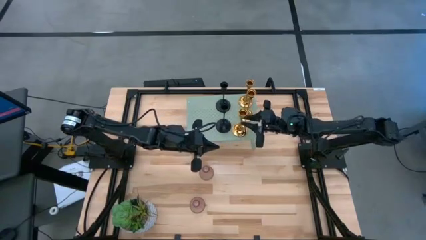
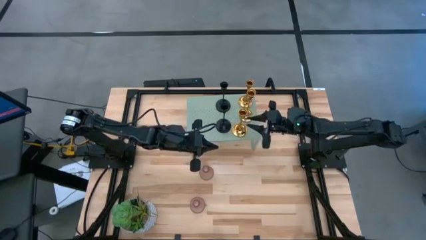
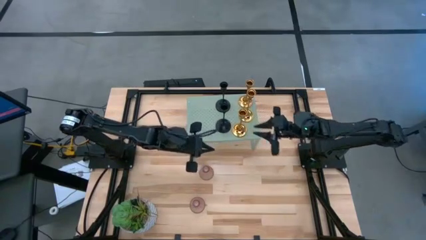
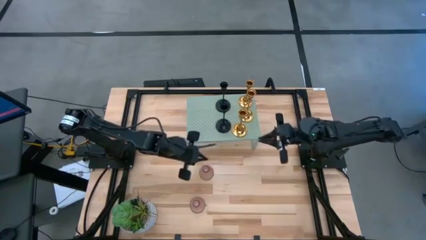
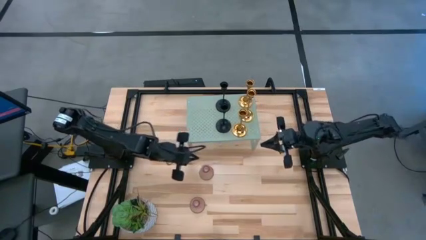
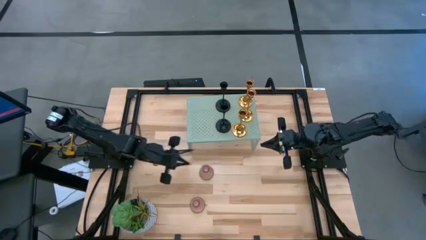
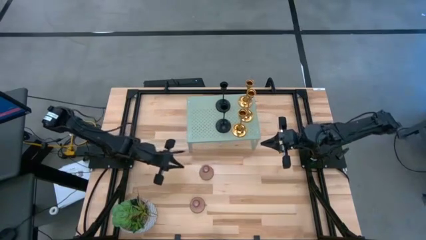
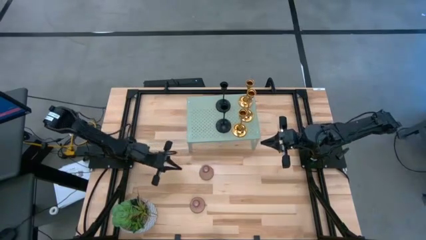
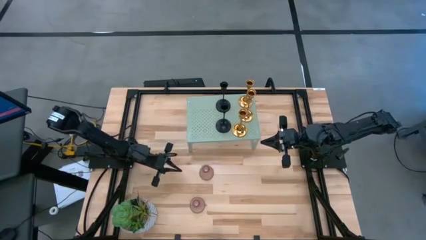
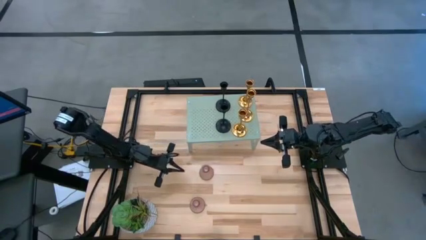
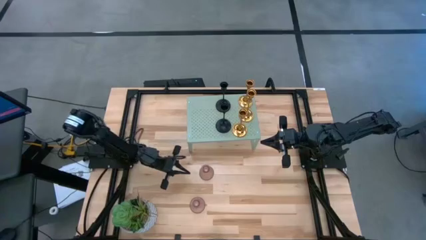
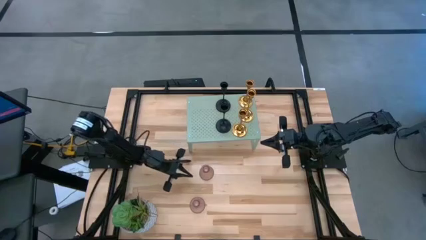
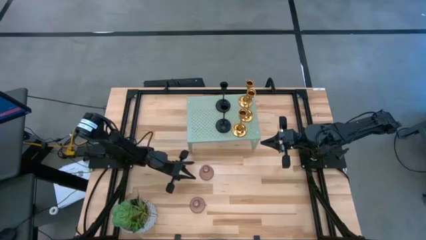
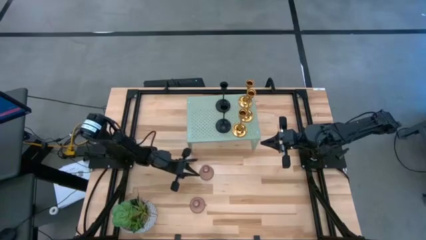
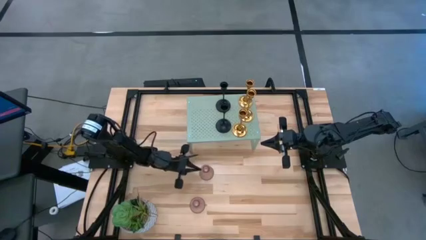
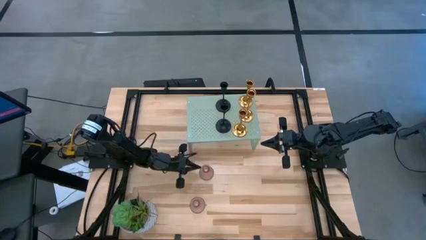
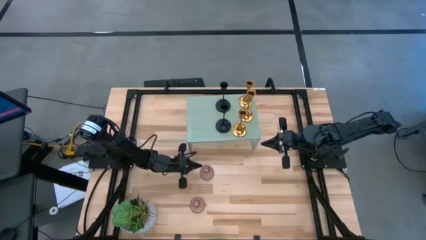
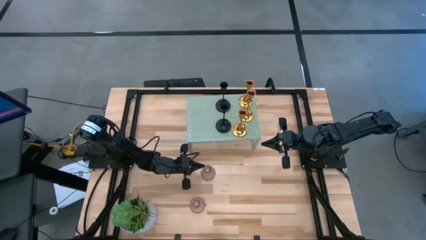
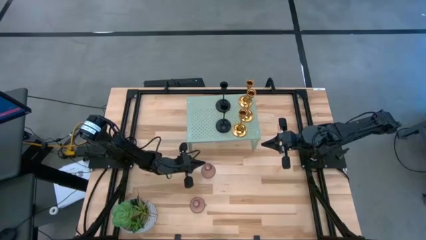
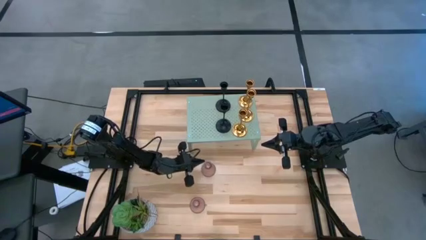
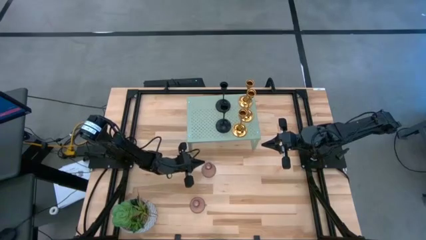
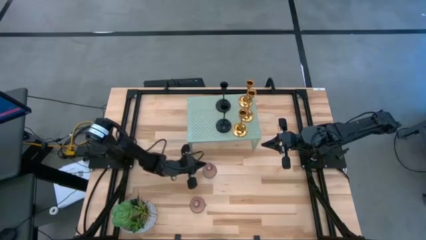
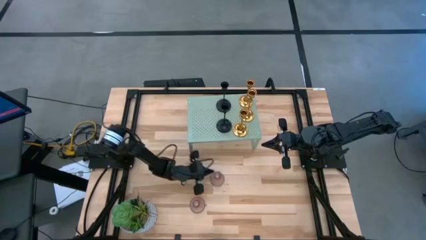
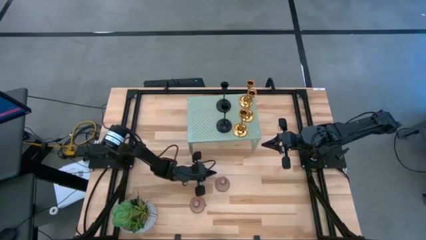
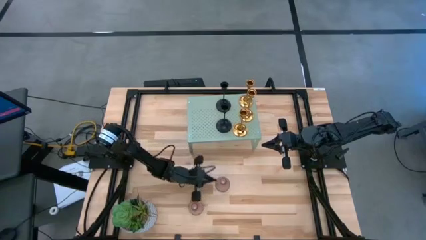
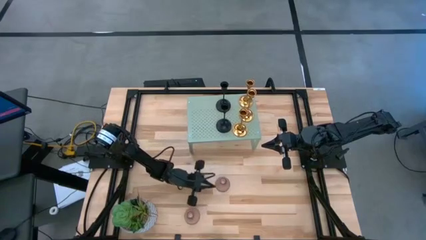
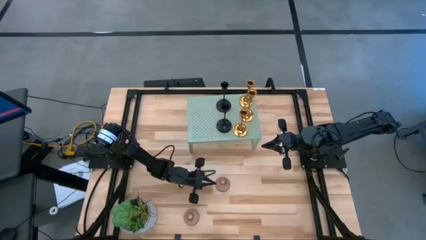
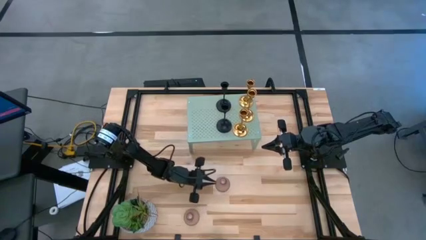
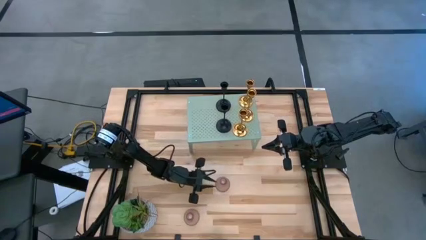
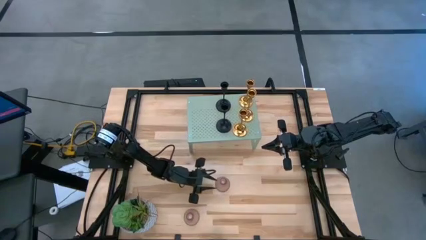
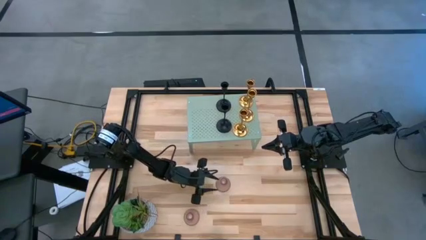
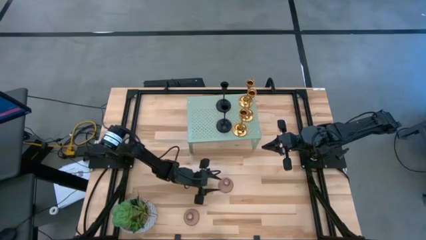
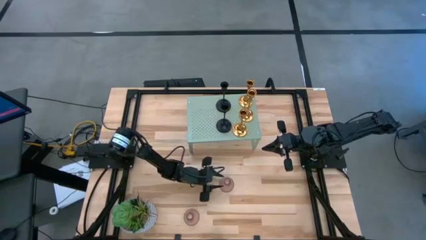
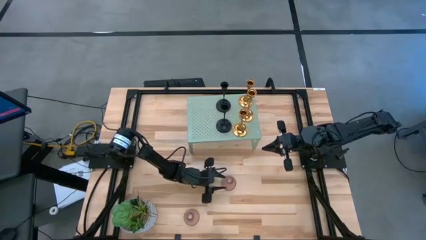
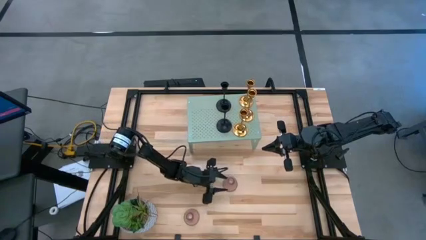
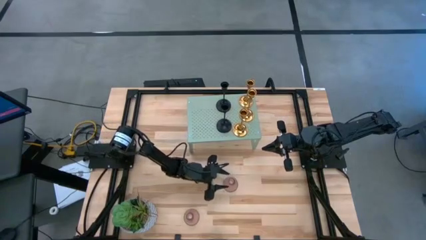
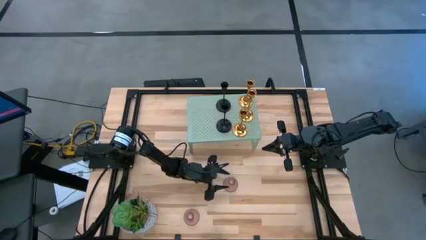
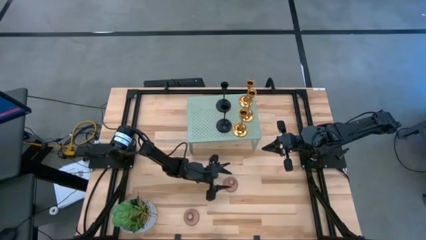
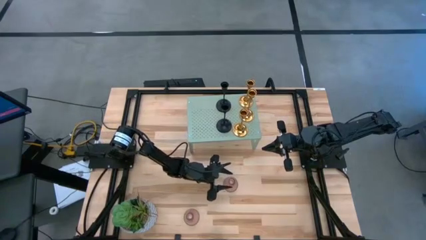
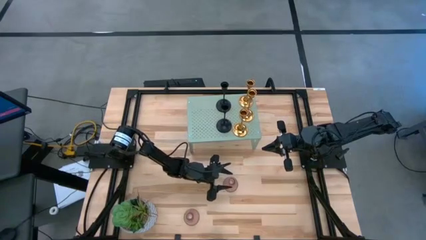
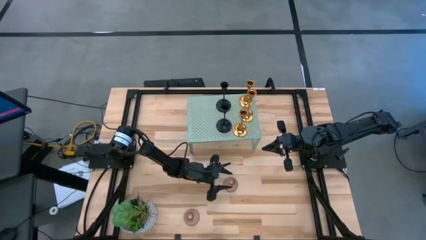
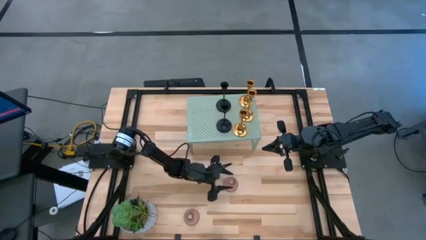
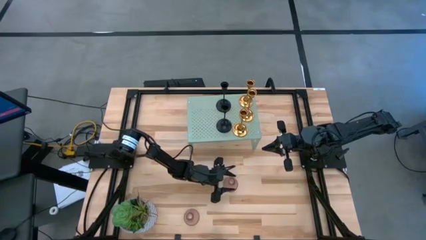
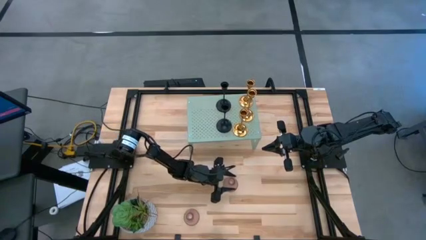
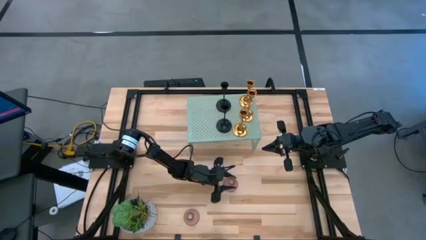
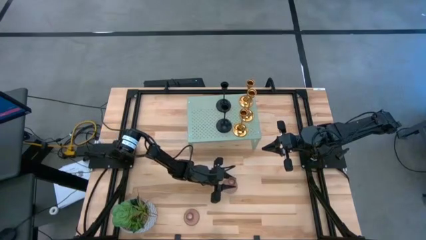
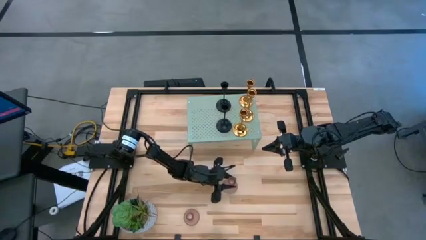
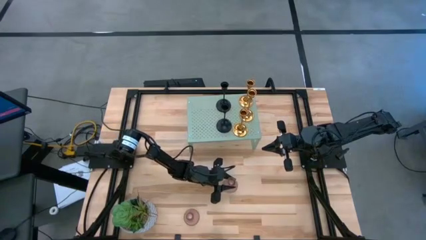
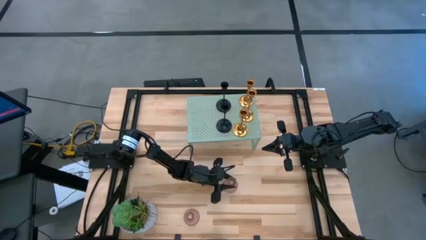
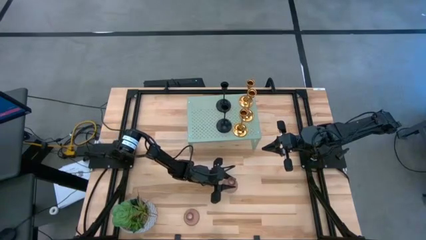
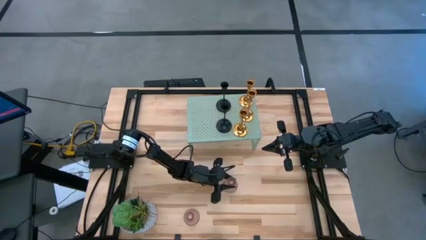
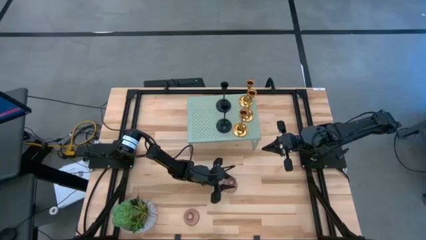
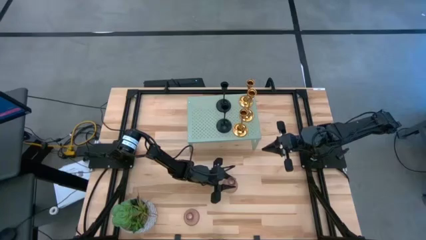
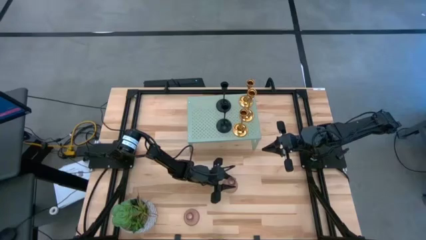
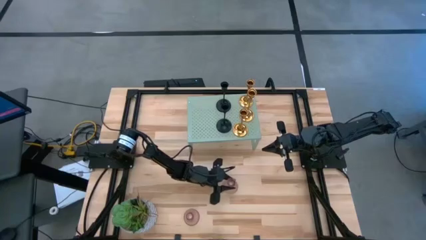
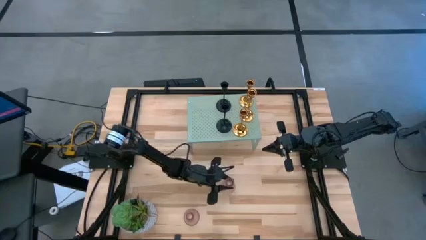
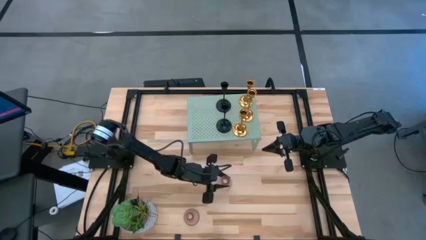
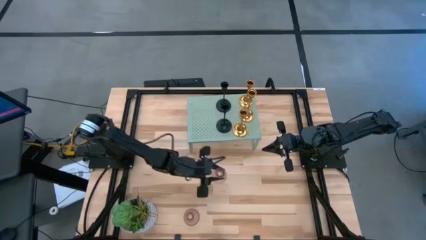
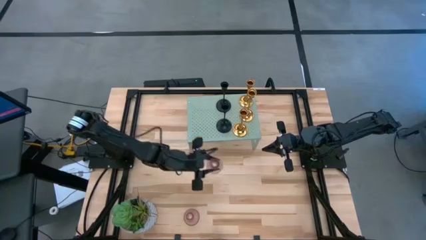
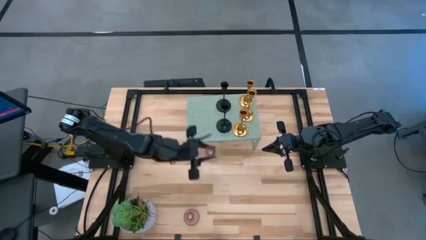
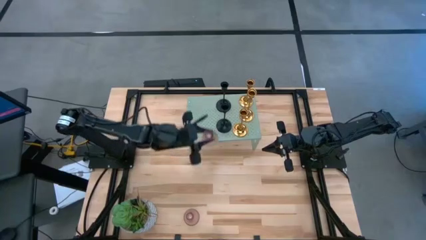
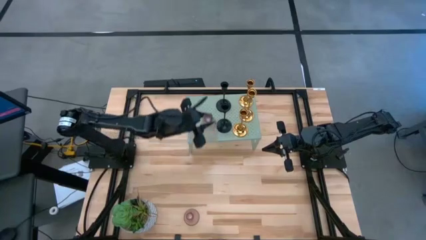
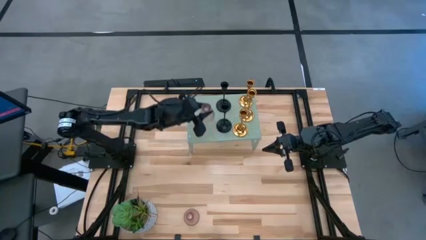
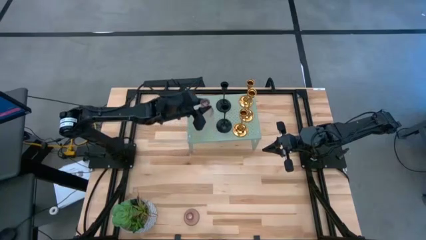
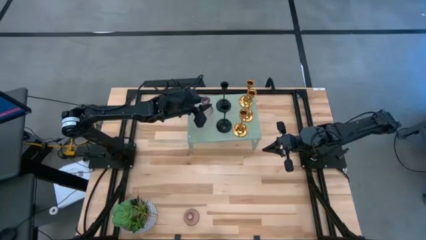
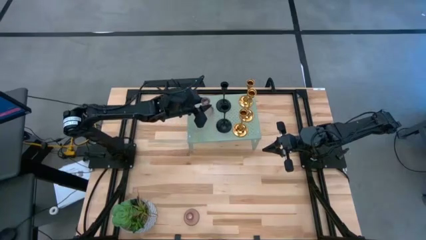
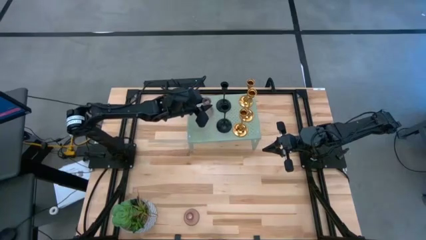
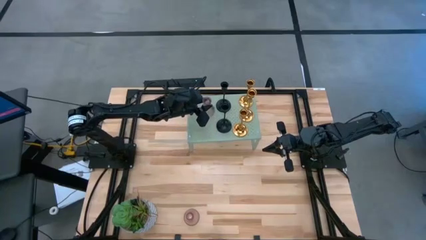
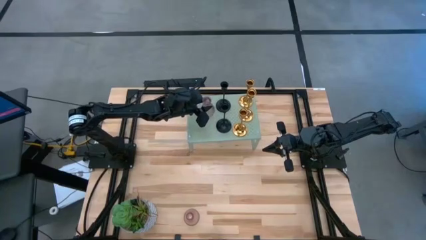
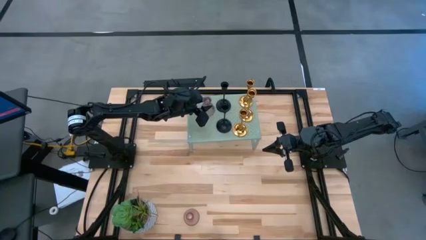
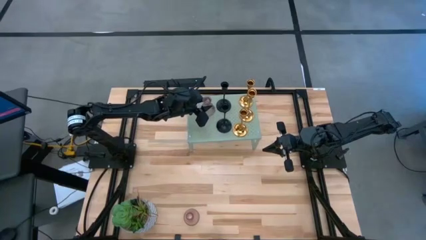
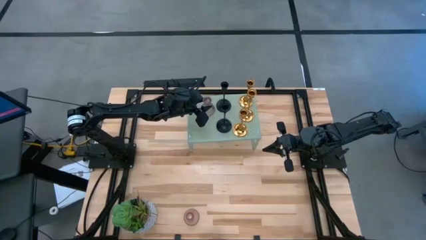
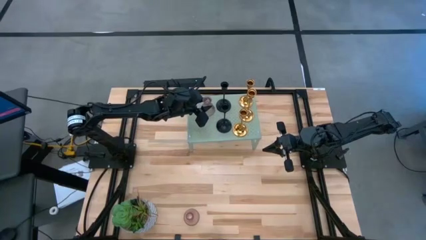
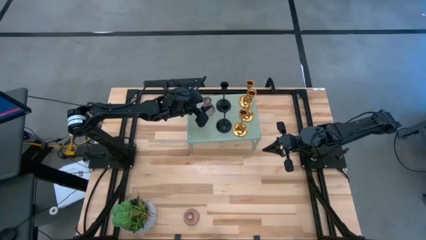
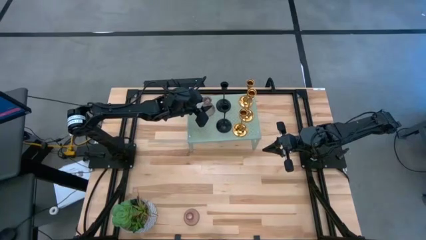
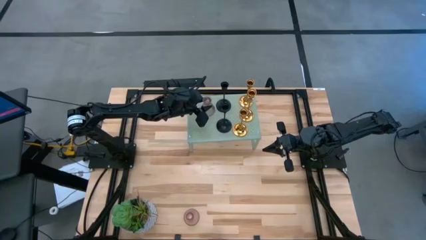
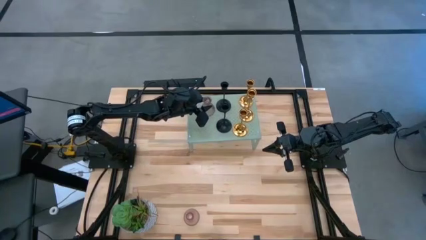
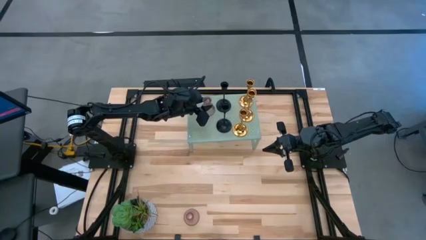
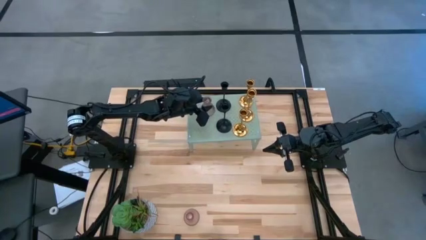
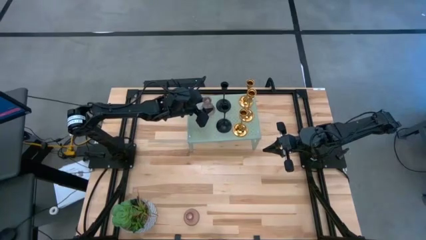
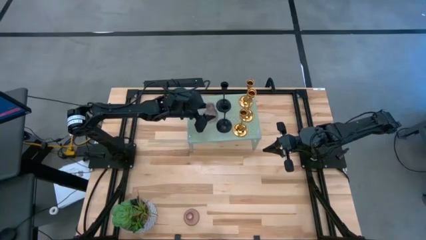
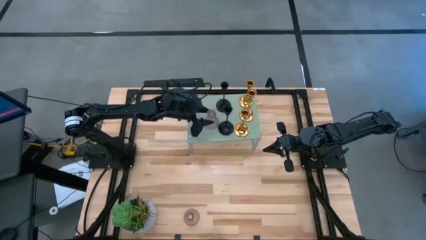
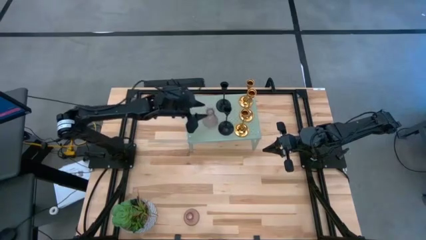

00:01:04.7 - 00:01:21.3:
Task: Pick & Place candle stick holders
Put the top pink glass candle holder on the shelf
